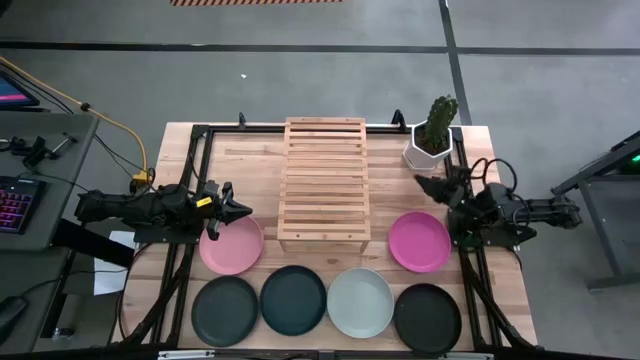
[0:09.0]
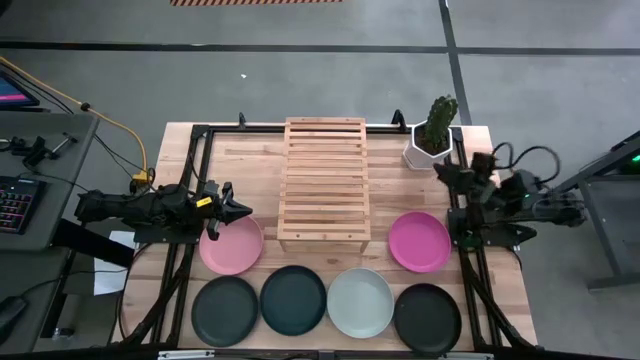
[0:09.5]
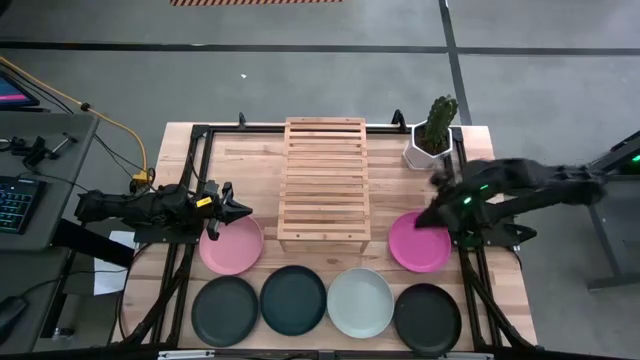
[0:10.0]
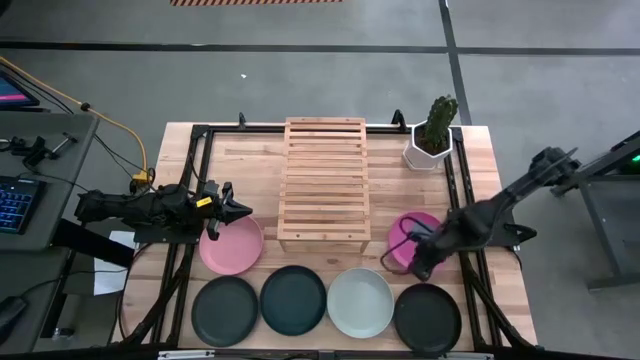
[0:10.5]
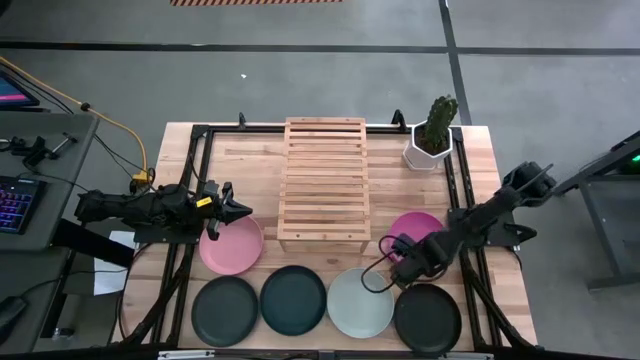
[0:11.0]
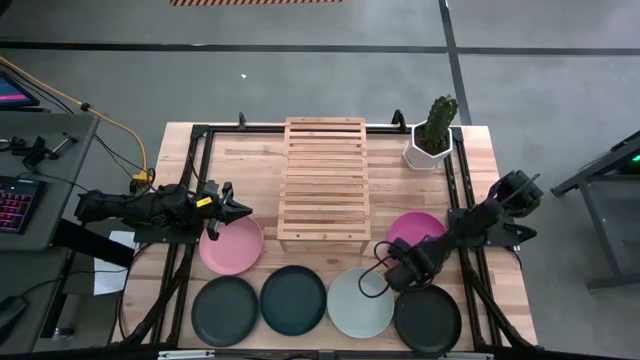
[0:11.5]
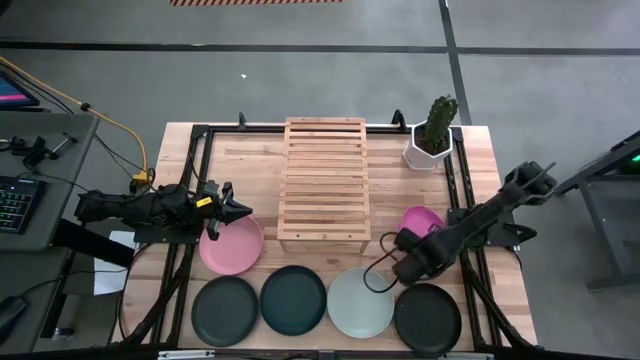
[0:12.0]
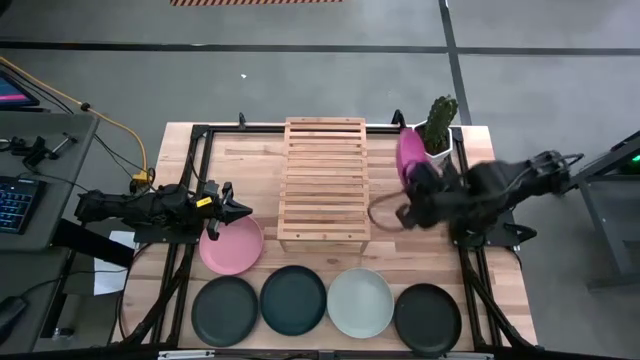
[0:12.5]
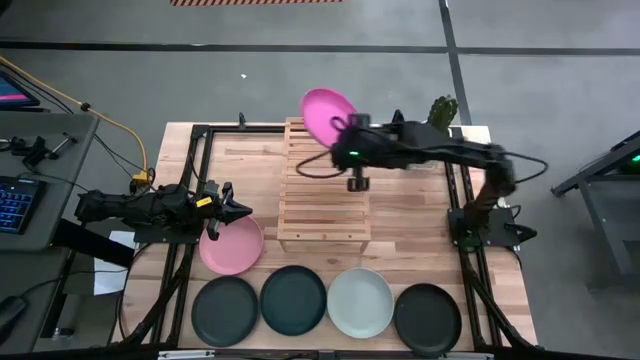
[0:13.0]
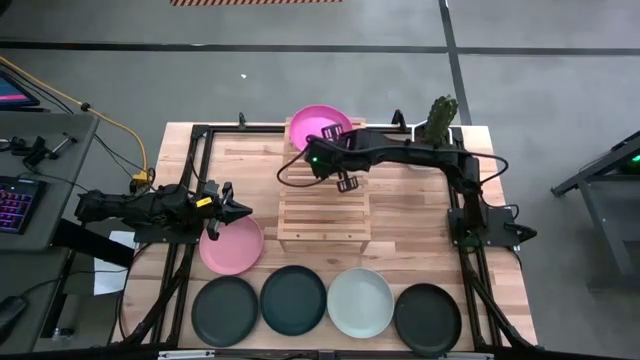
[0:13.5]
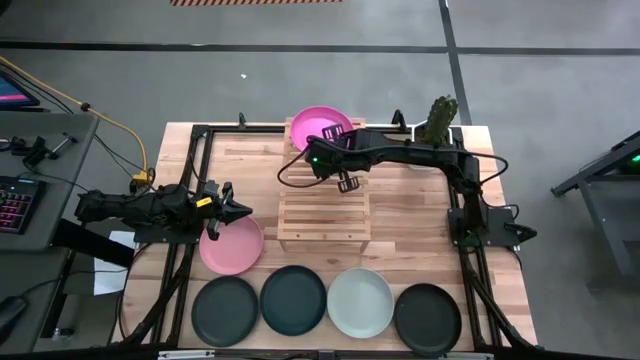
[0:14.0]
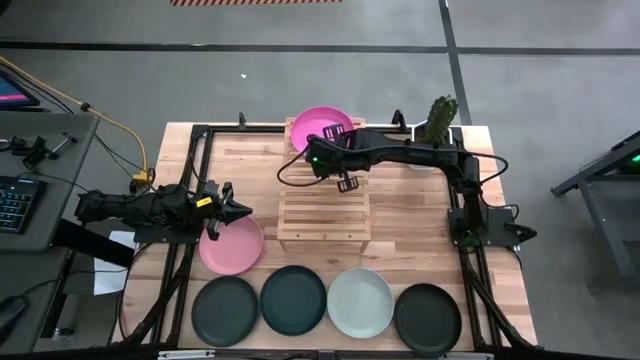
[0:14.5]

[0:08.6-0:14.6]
Task: Place and stack plates onto a shelf
Put the pink plate on the shelf

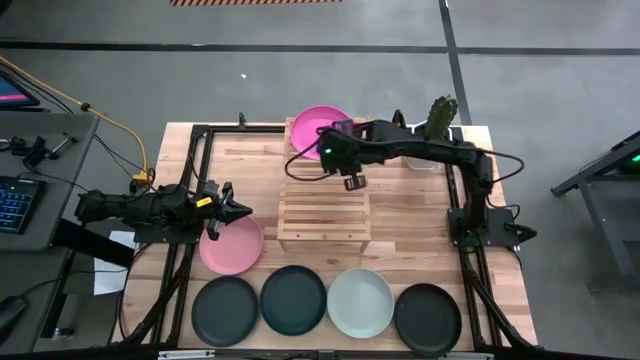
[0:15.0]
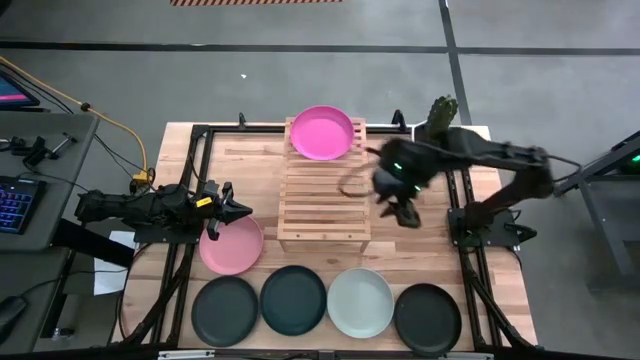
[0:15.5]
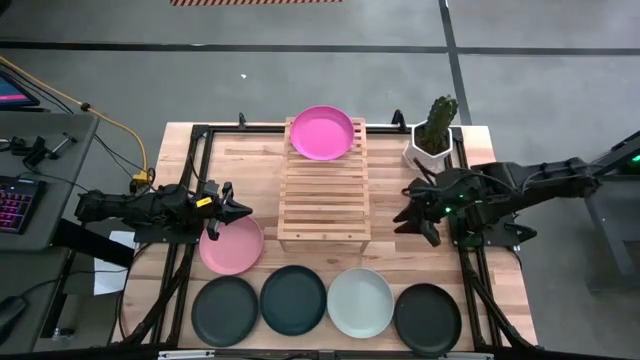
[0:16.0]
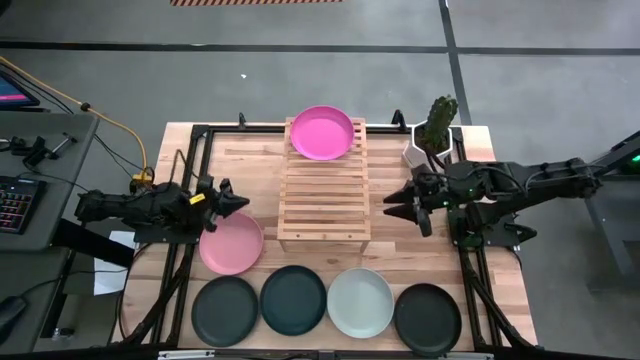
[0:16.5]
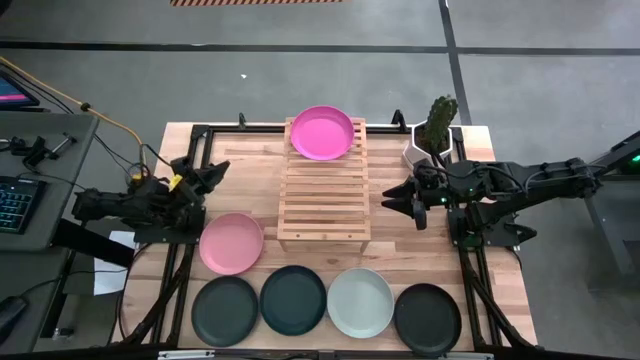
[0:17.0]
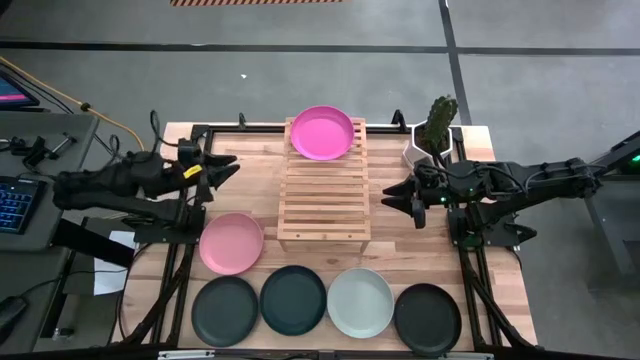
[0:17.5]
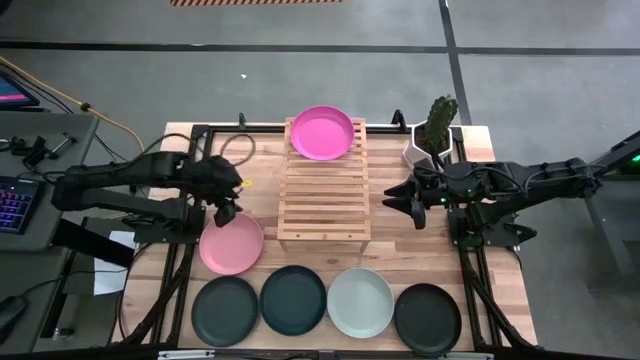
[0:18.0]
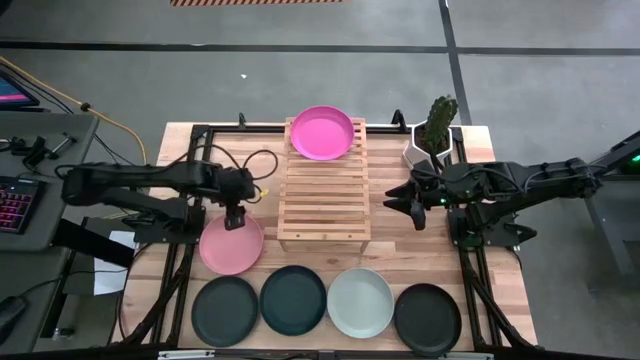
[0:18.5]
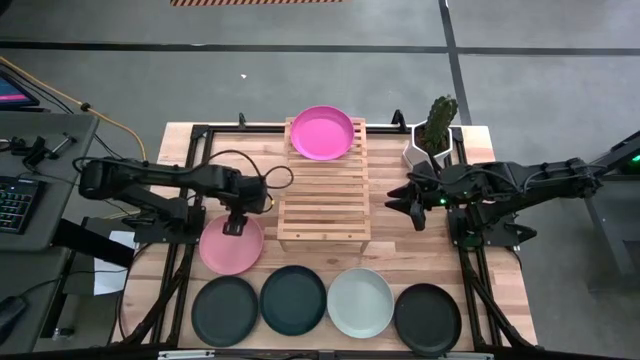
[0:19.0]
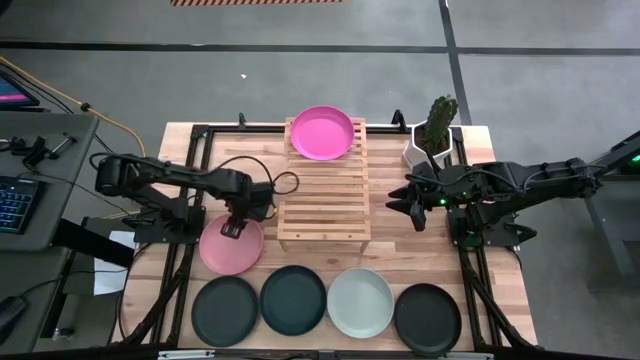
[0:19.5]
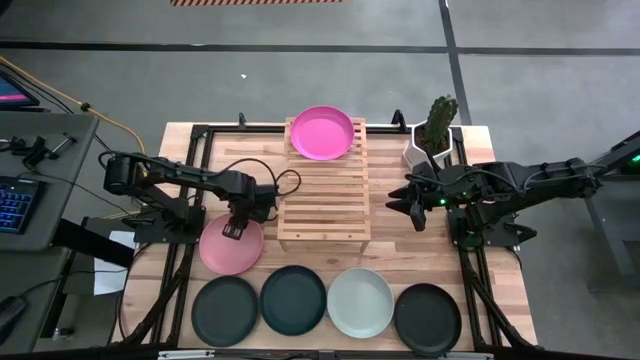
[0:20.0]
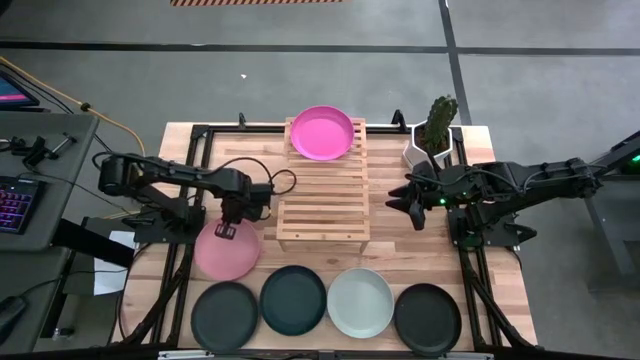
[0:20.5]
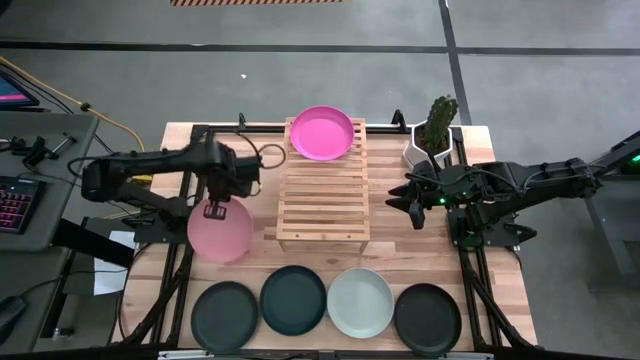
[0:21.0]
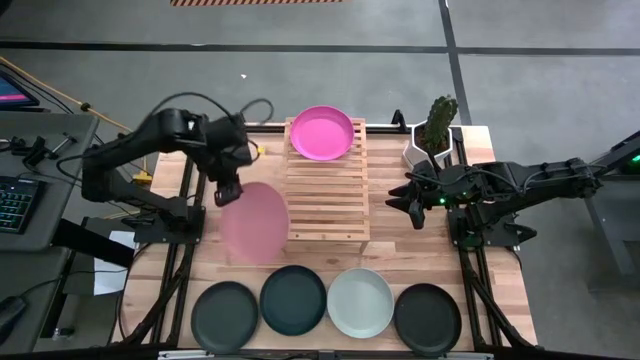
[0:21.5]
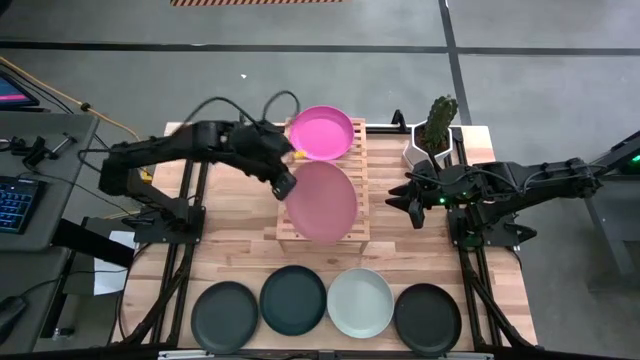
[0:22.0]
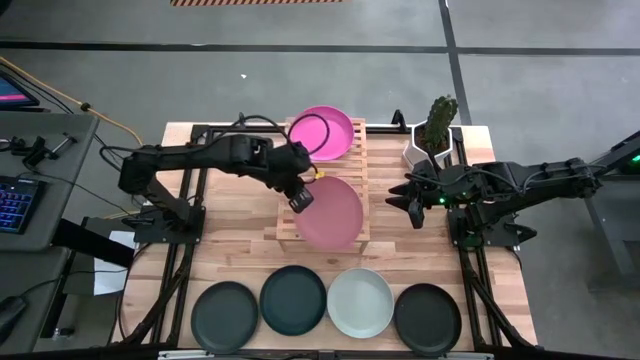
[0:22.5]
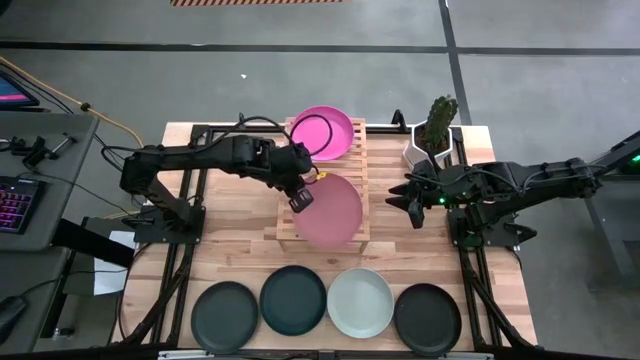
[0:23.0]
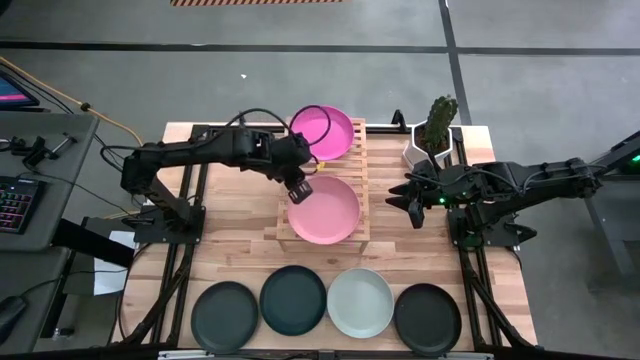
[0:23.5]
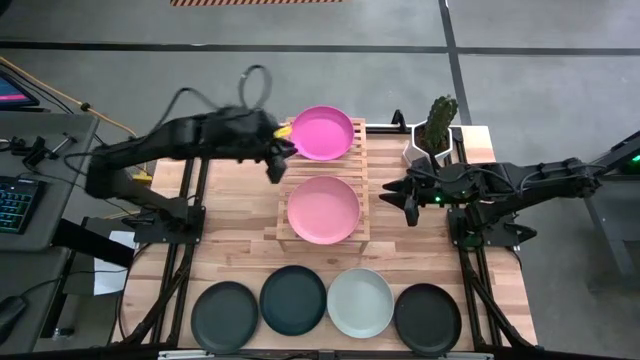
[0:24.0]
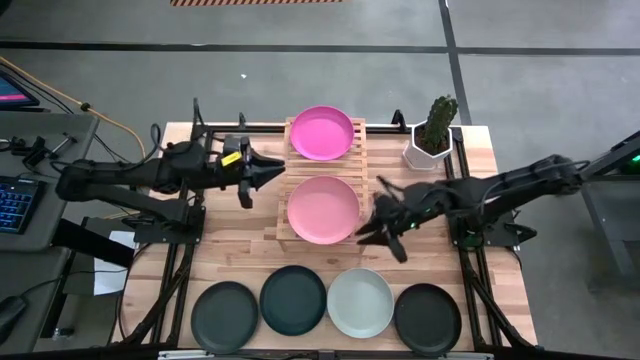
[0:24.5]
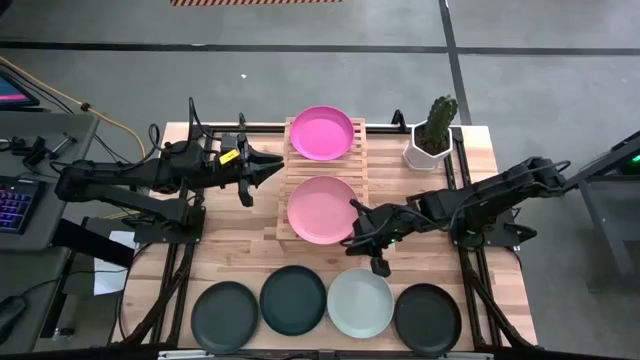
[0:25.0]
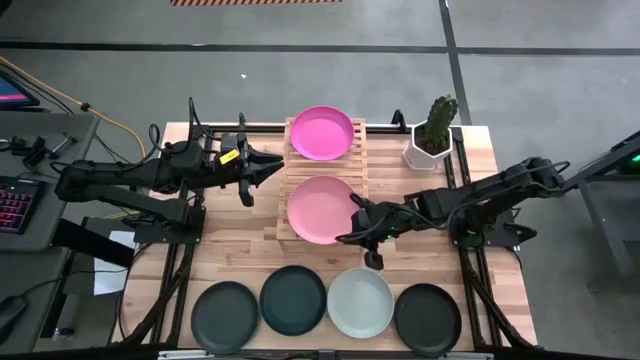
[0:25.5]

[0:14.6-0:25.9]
Put the light pink plate on the shelf

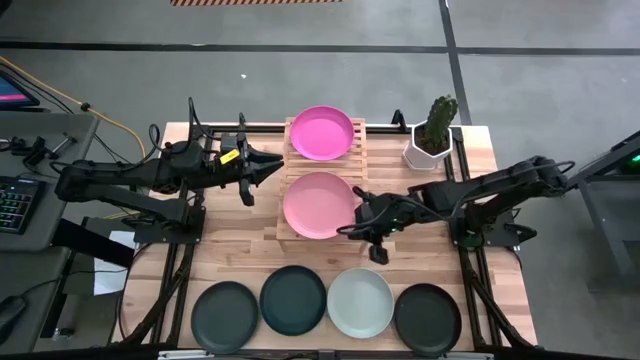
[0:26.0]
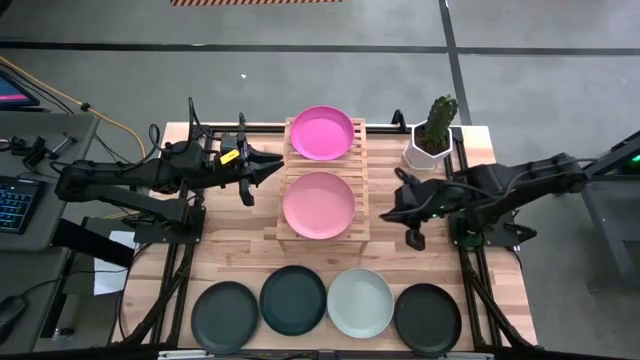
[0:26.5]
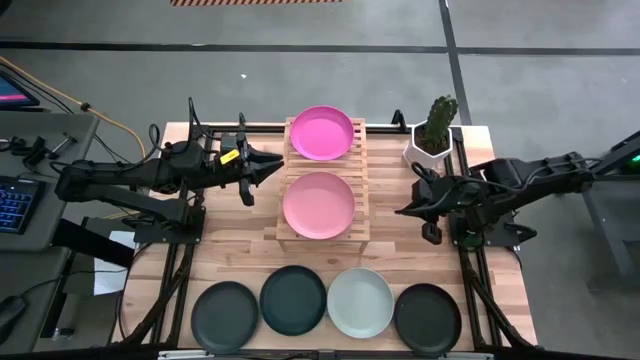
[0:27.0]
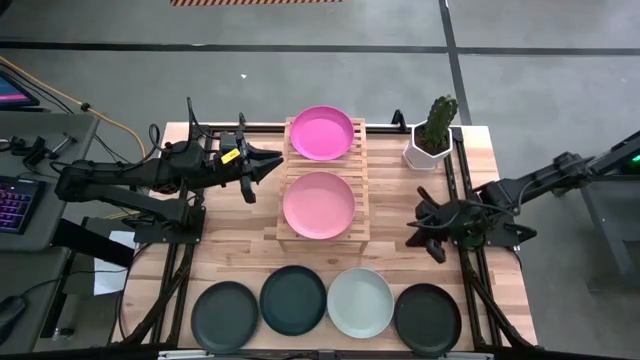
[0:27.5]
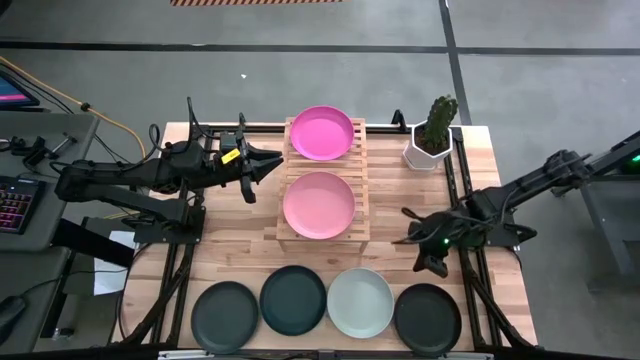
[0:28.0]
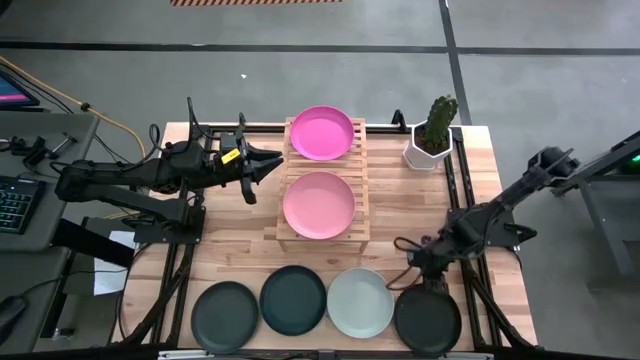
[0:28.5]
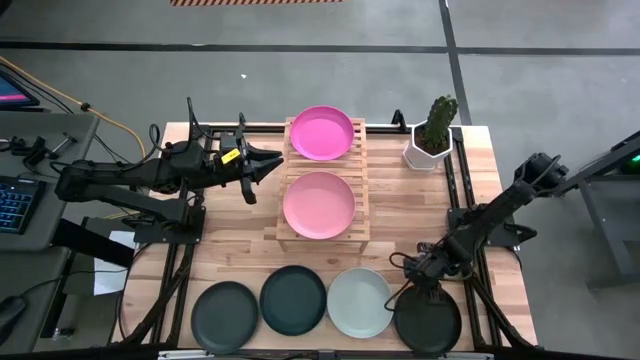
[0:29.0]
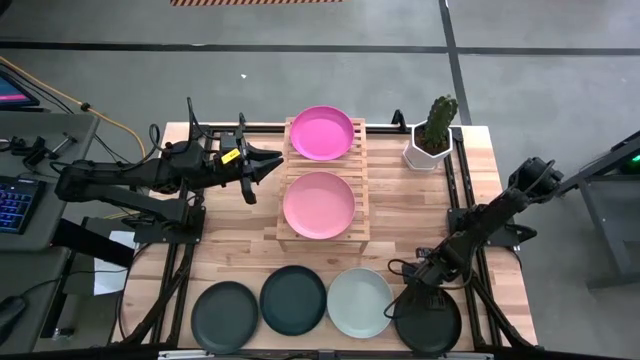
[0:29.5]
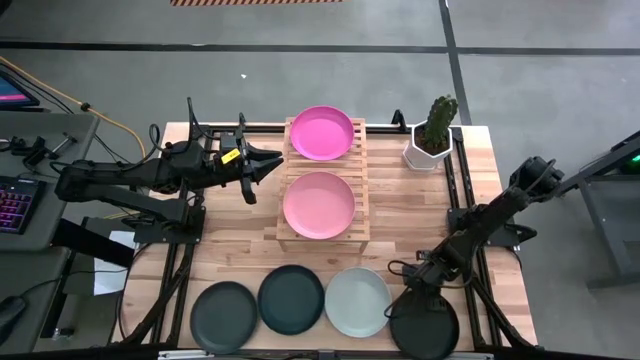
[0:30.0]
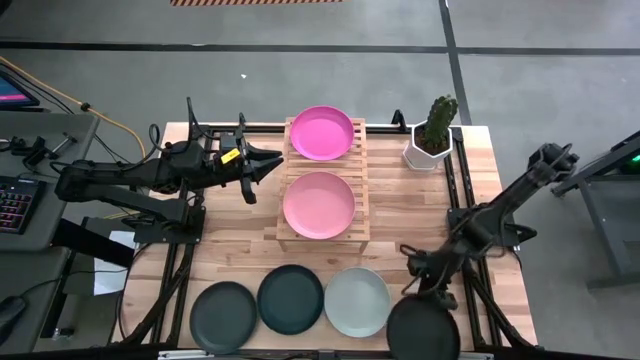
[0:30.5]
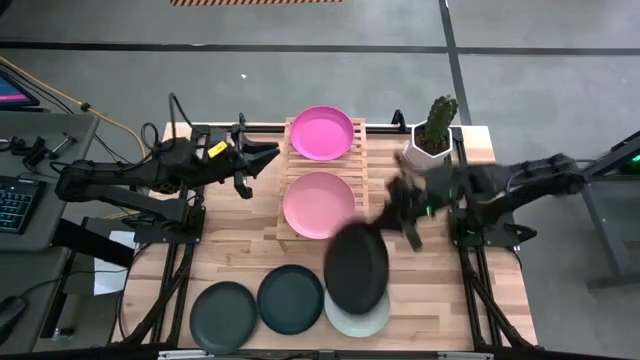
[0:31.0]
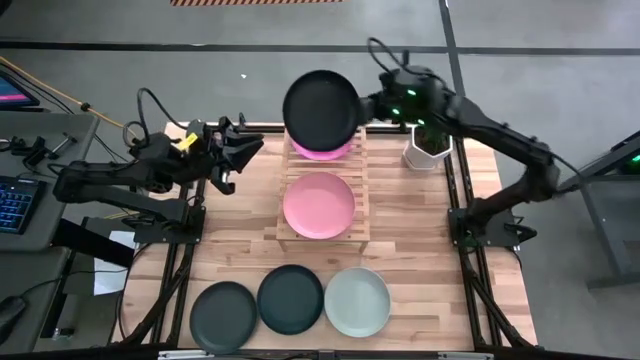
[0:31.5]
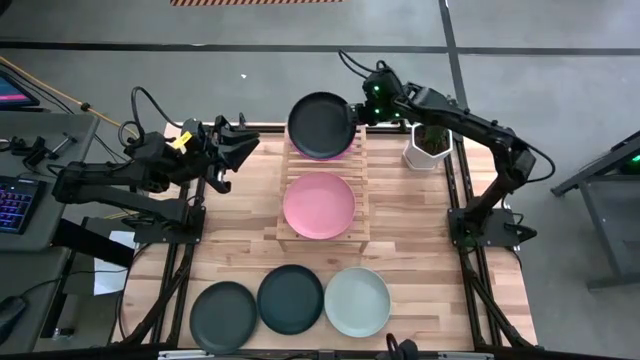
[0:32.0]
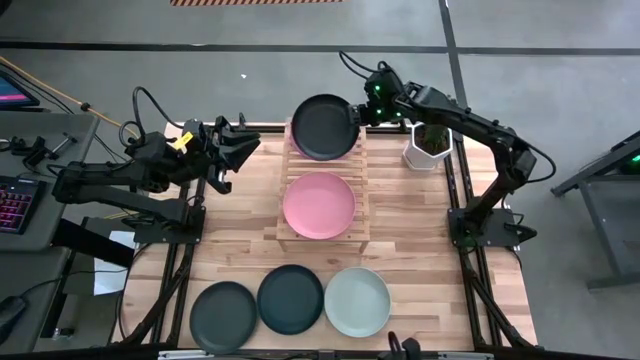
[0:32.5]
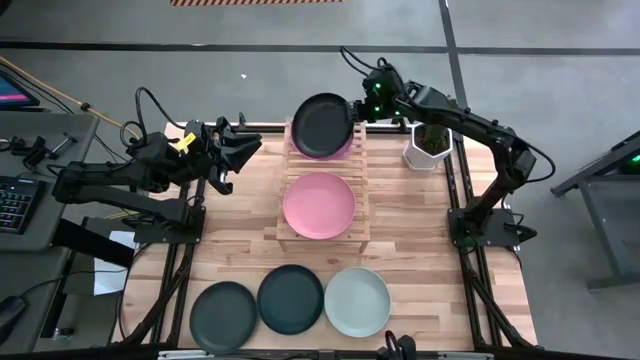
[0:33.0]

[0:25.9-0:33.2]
Stack the right black plate on top of the pink plate on the shelf
